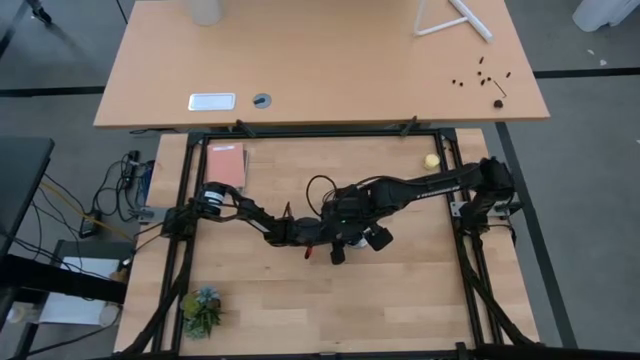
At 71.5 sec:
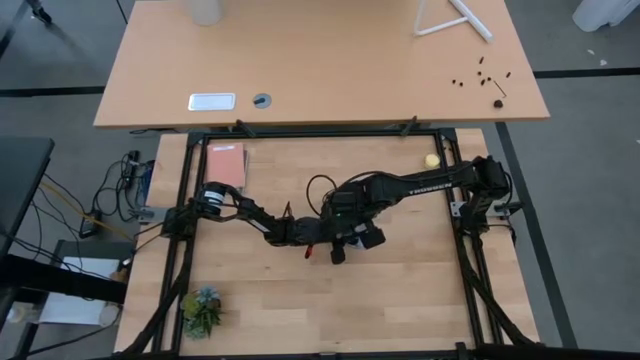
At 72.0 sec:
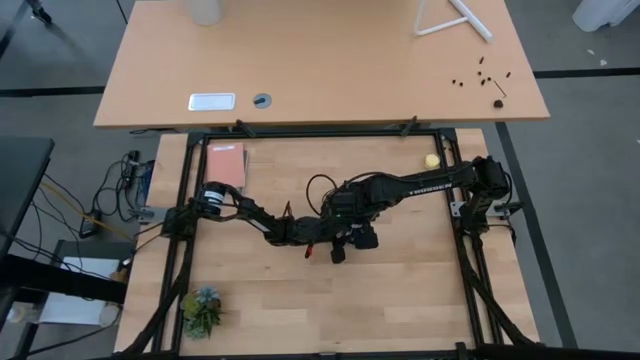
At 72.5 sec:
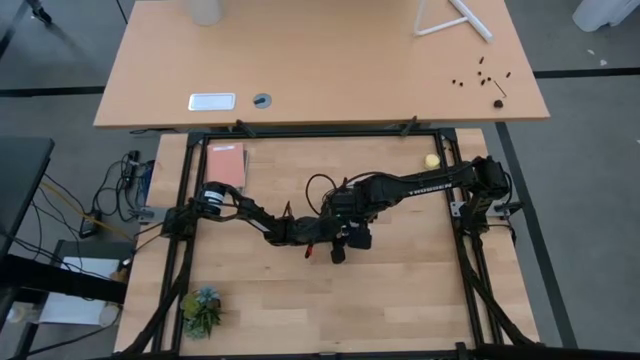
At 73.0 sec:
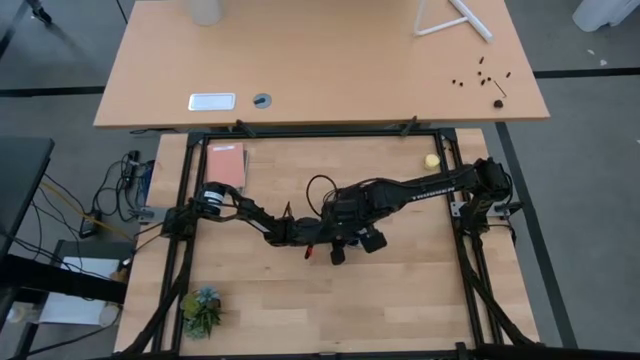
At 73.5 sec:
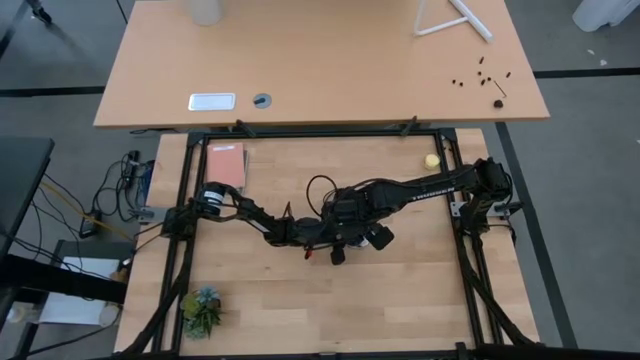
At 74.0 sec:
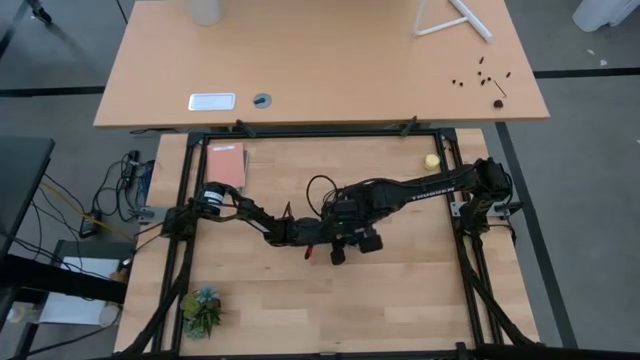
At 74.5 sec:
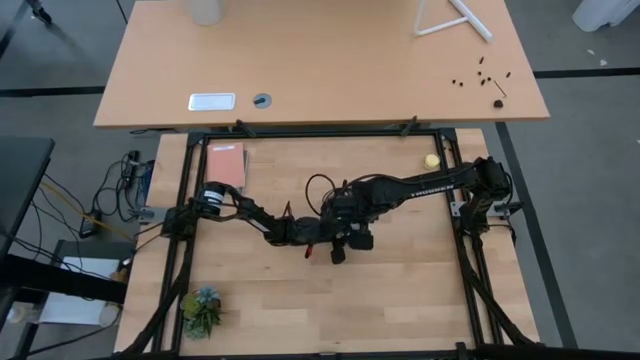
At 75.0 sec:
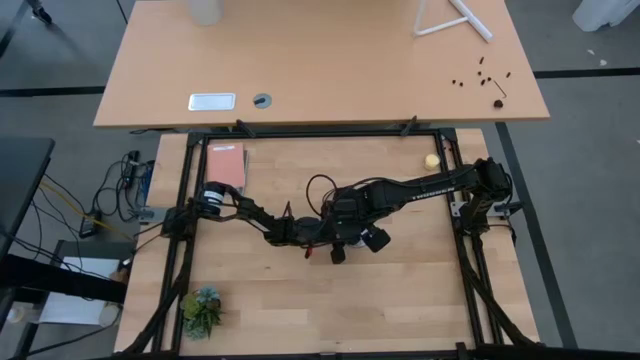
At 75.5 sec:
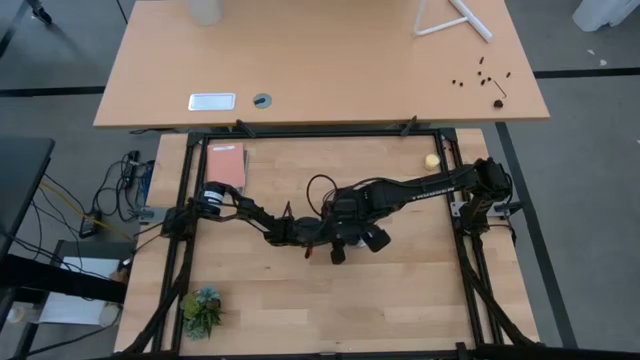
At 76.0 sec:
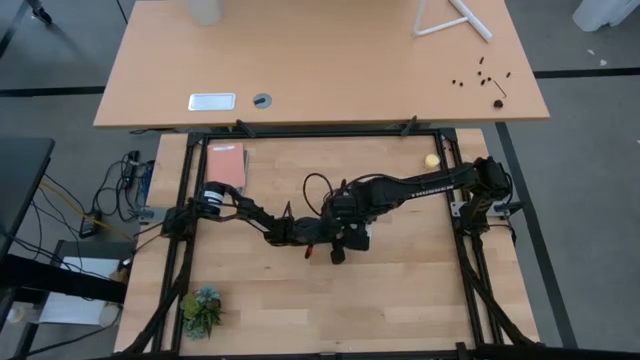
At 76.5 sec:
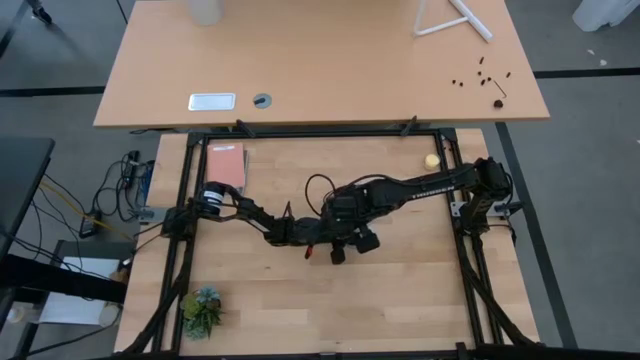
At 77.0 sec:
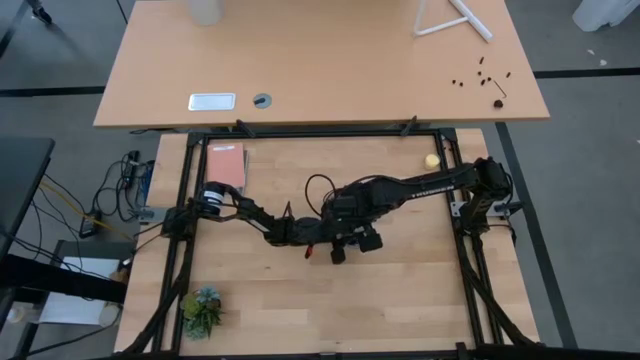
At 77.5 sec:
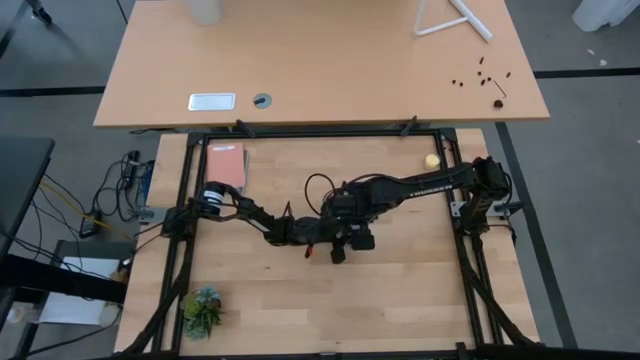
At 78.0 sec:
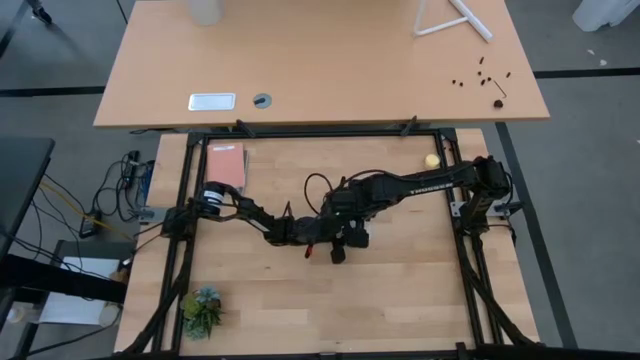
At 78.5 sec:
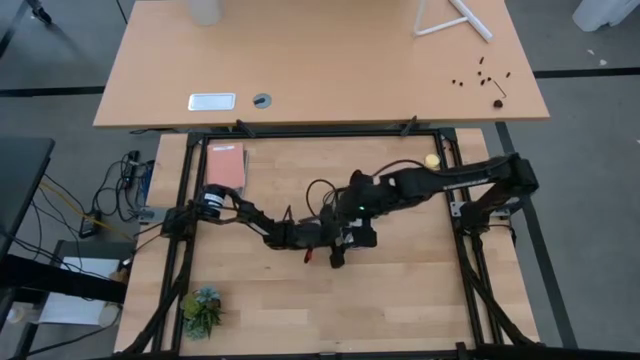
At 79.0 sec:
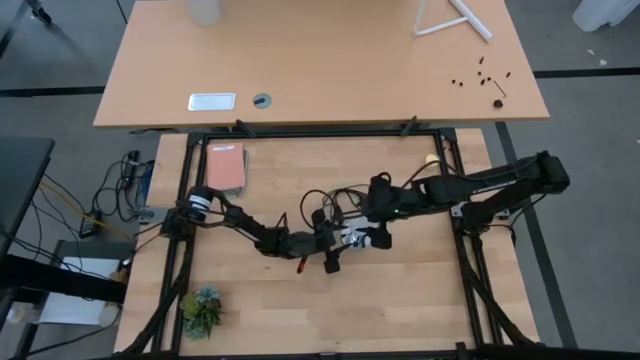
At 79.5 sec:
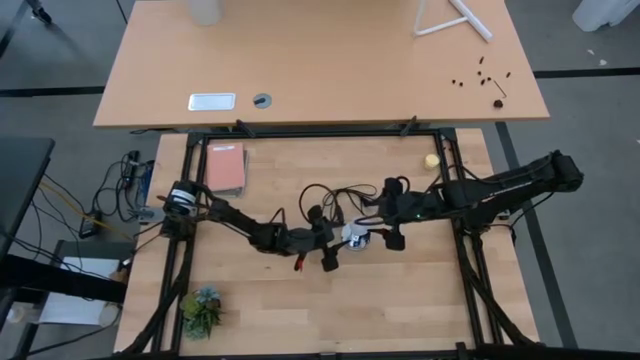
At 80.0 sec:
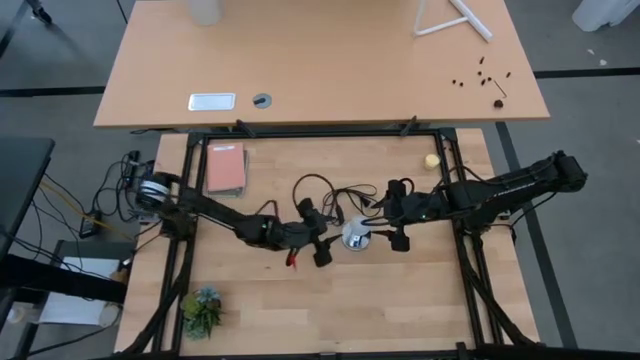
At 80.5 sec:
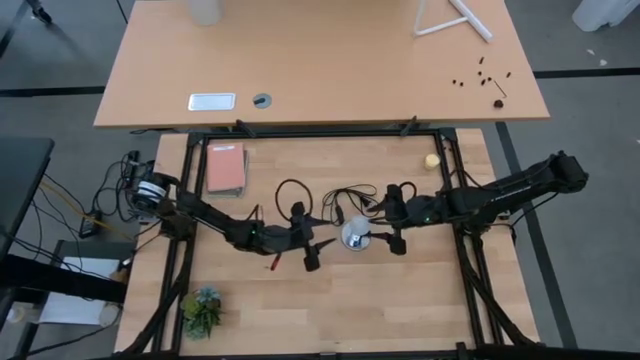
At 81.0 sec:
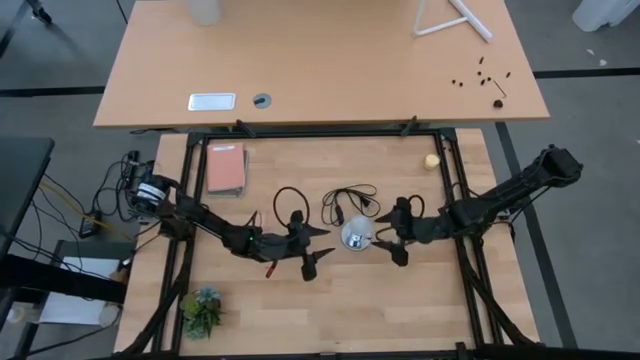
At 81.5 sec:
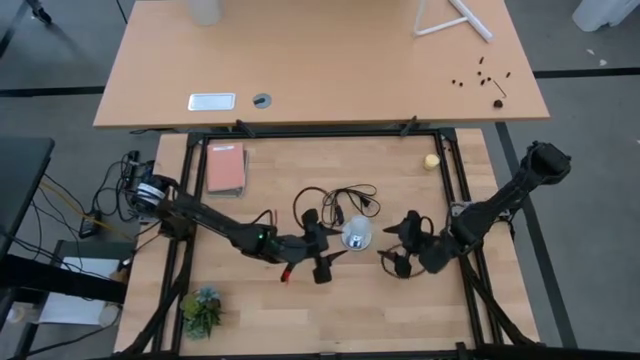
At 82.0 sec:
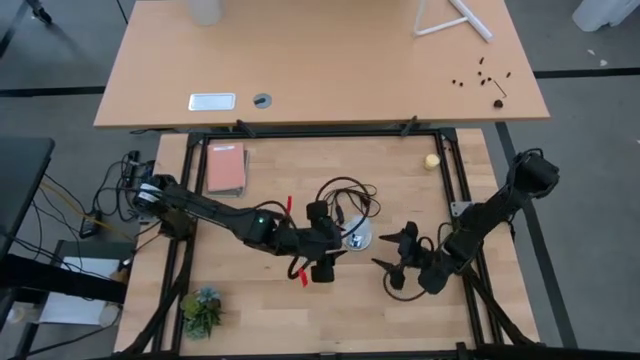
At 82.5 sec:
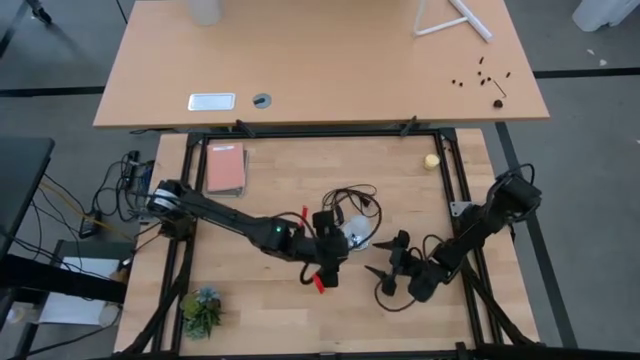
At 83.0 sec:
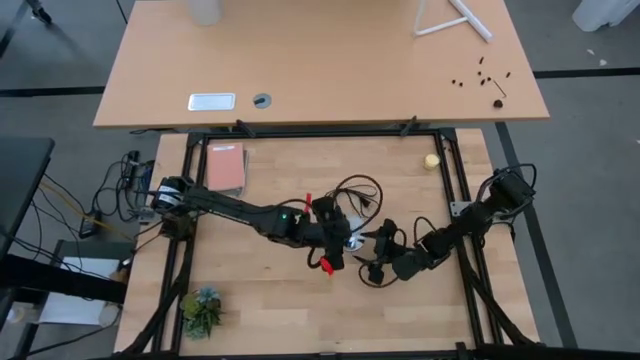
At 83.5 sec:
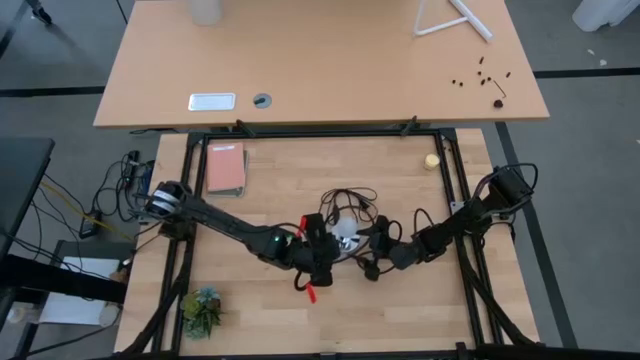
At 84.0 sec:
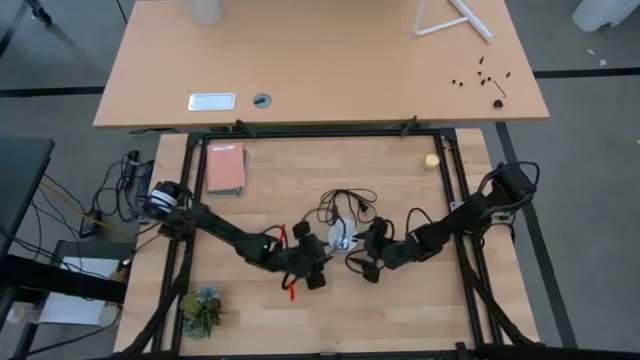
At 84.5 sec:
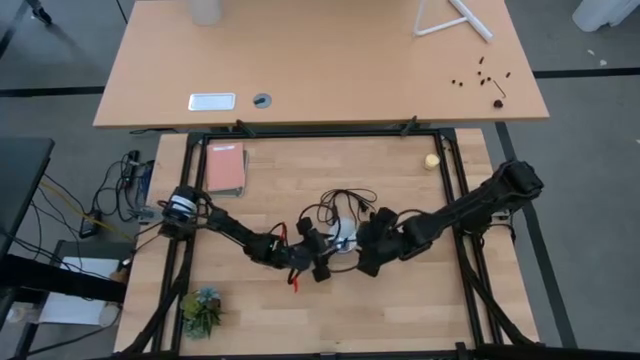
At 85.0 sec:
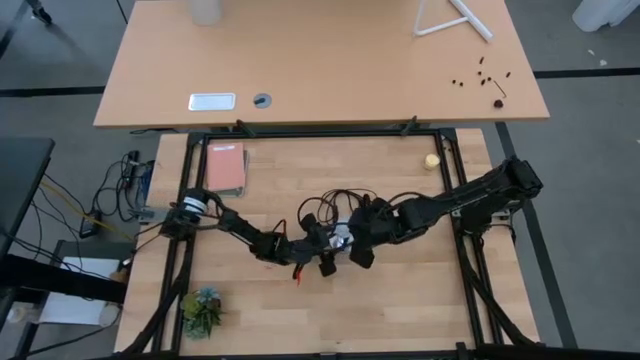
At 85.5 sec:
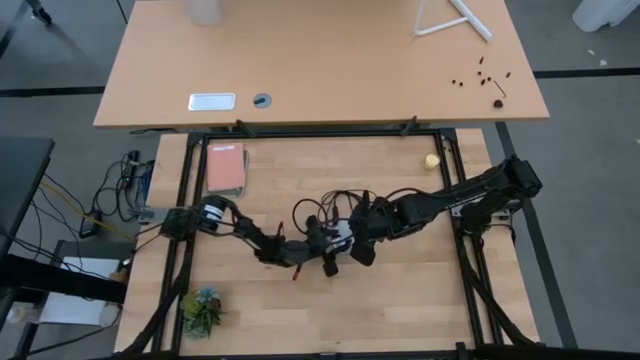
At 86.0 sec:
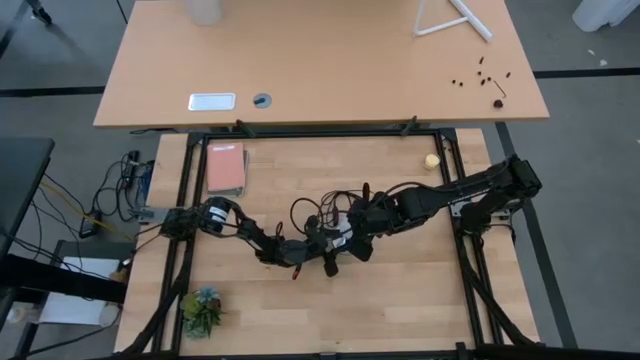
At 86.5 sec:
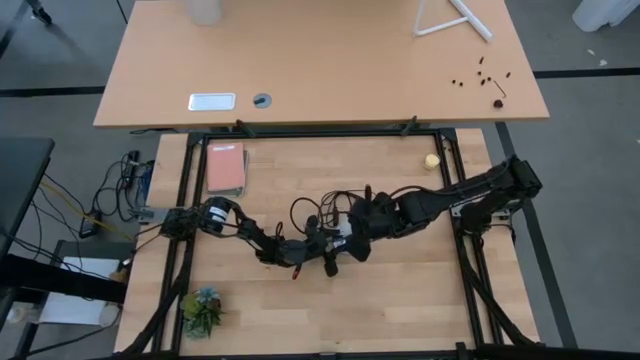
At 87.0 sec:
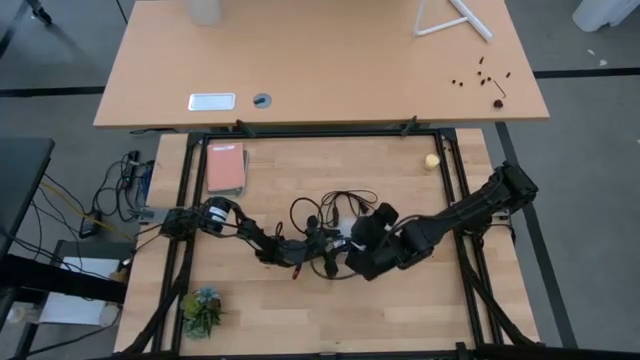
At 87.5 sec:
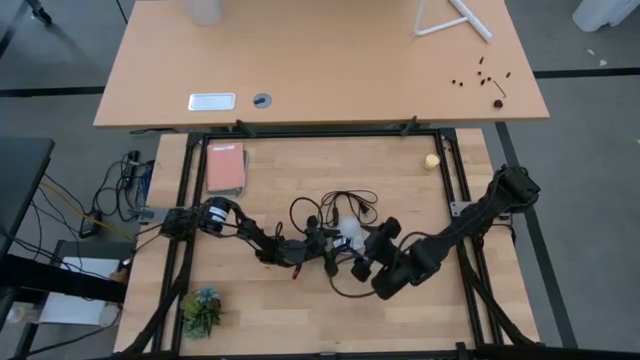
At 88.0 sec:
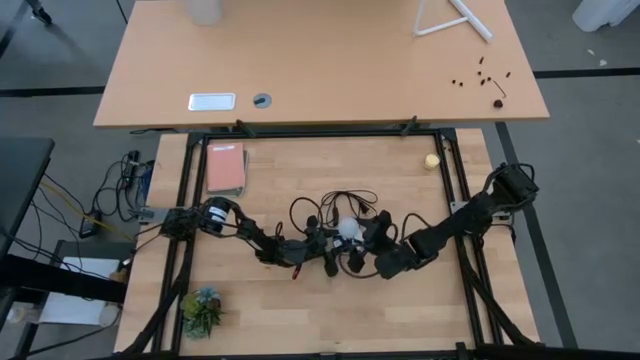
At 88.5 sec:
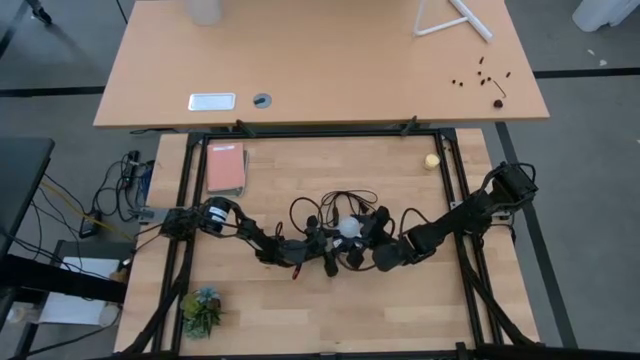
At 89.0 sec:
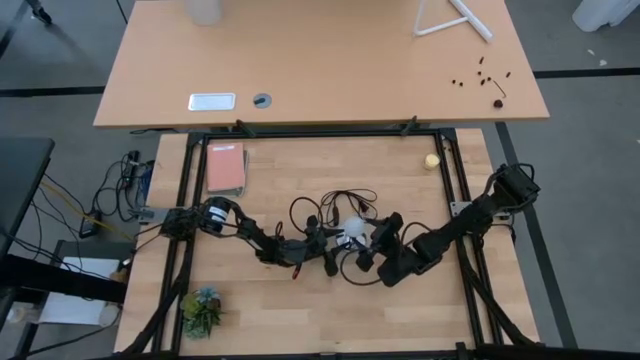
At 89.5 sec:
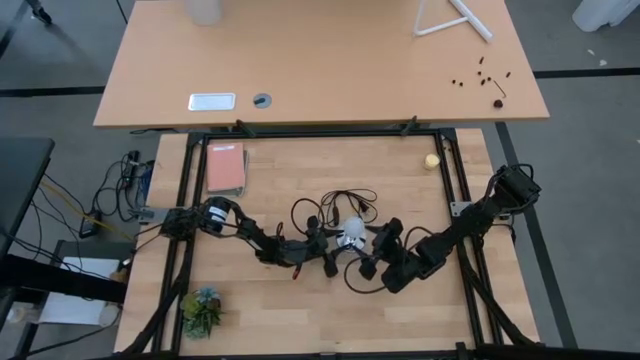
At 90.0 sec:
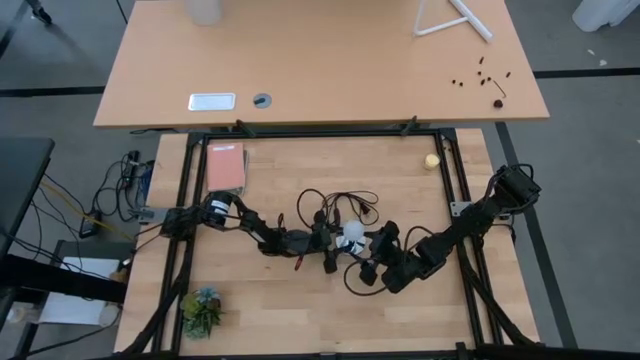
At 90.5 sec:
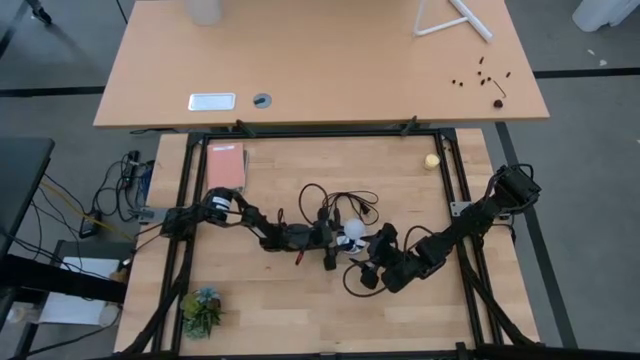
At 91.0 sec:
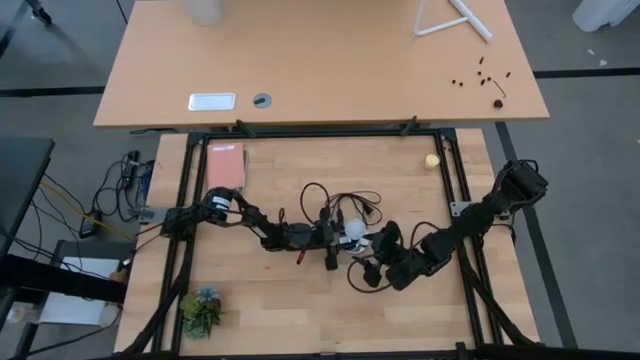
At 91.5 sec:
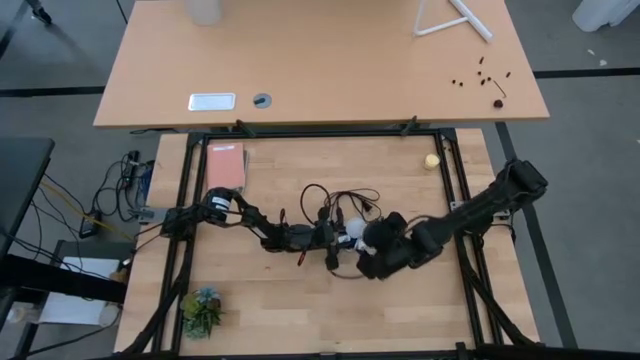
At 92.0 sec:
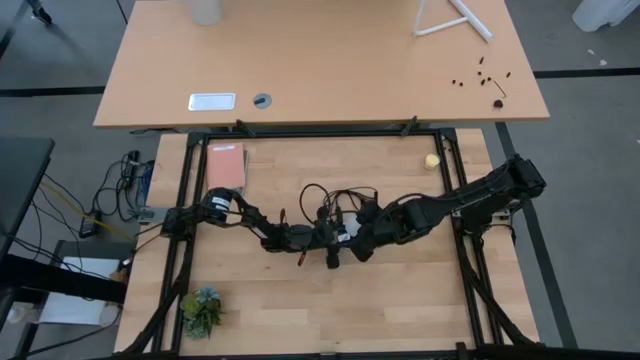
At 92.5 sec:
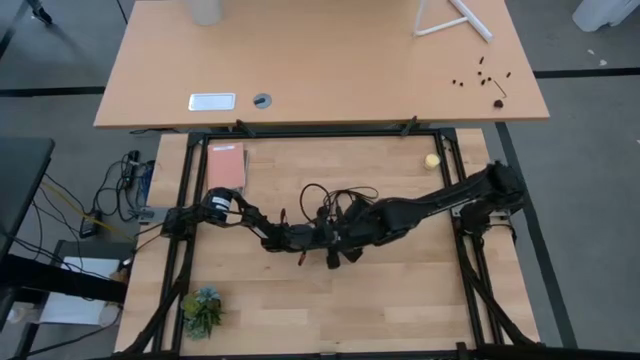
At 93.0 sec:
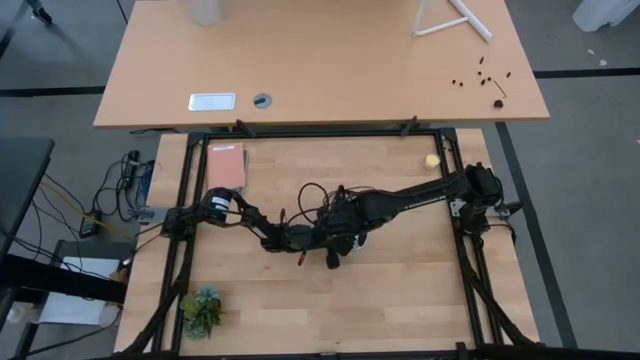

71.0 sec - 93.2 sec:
Task: Screw lightbulb
Insert the lightbulb into the lamp
